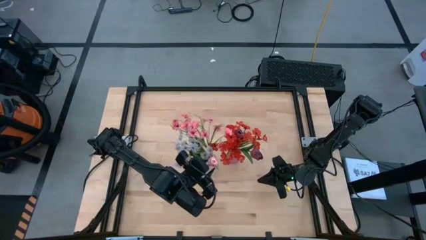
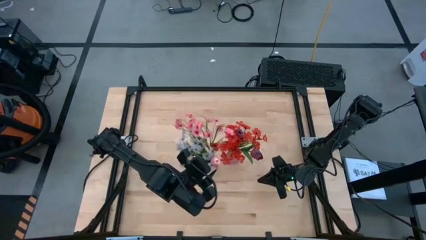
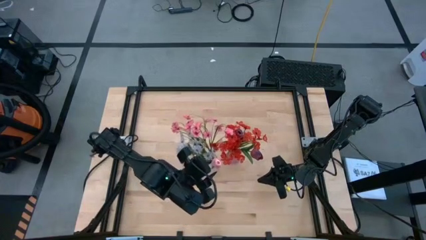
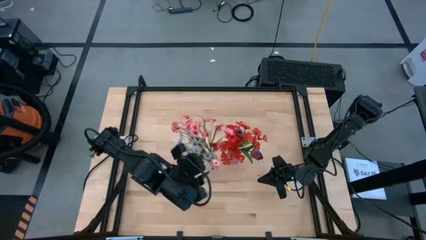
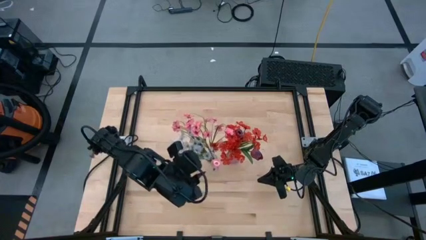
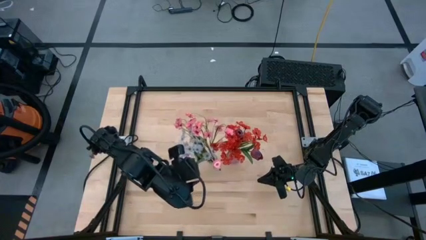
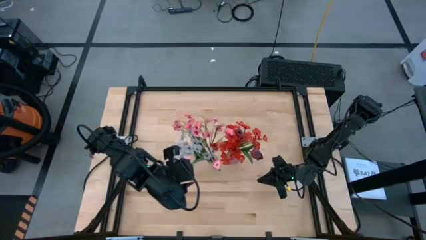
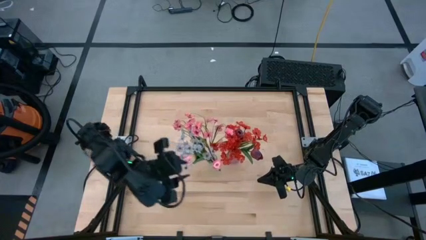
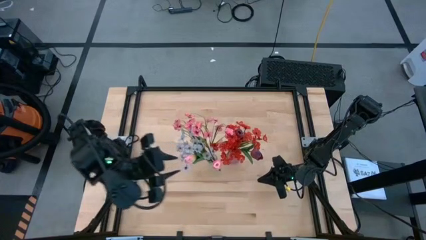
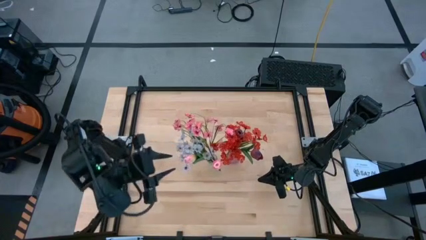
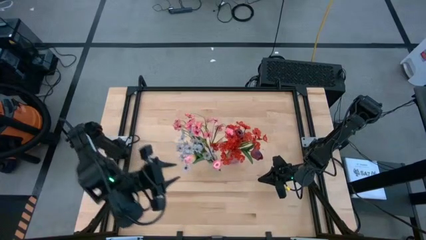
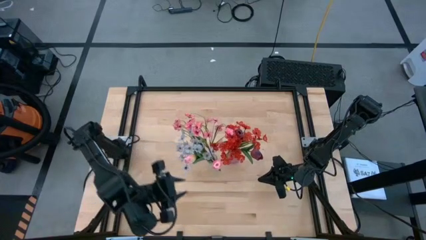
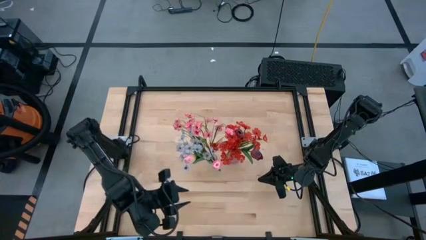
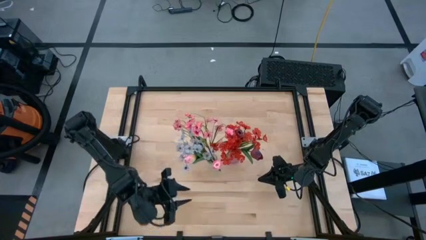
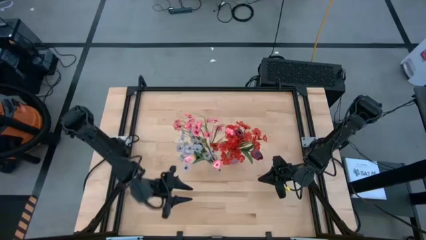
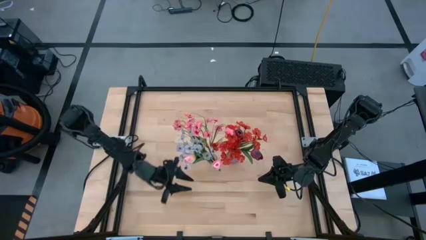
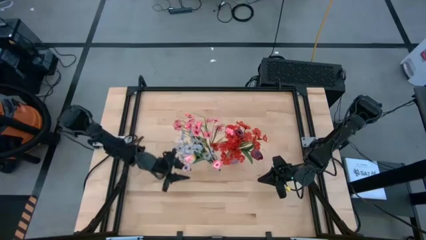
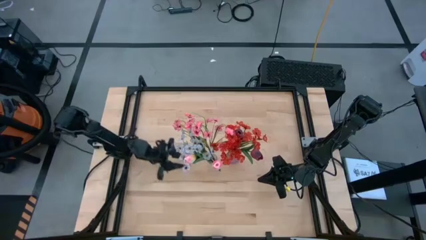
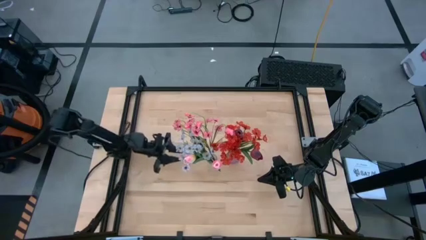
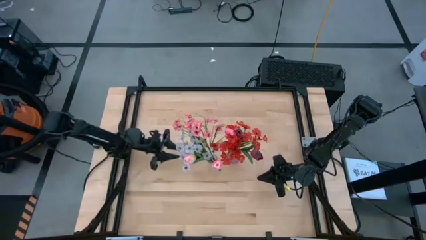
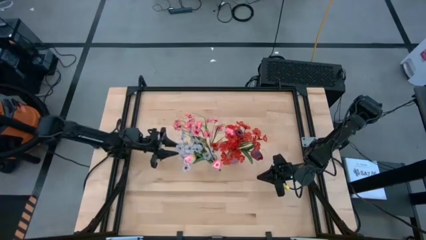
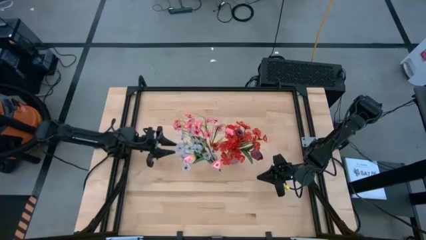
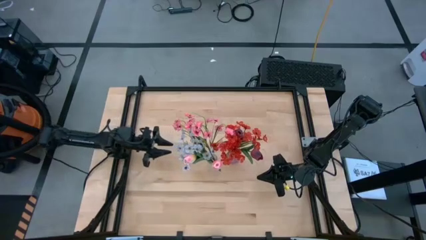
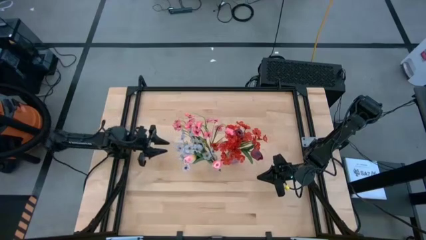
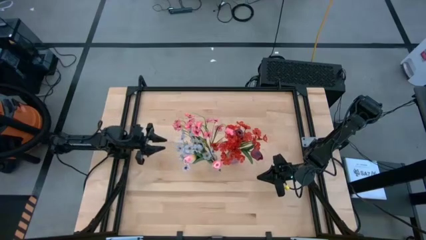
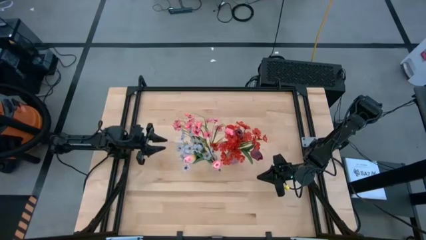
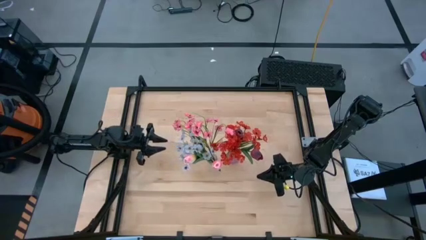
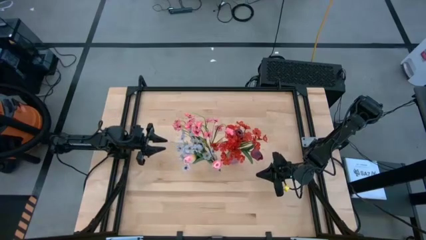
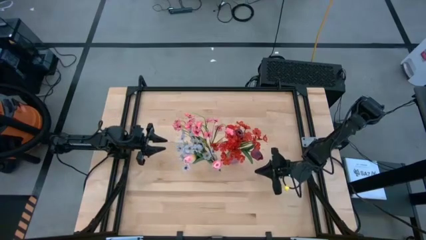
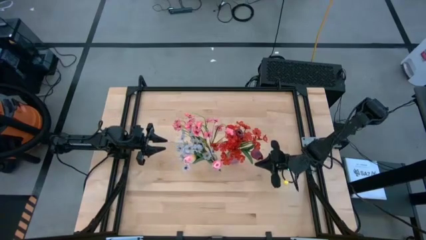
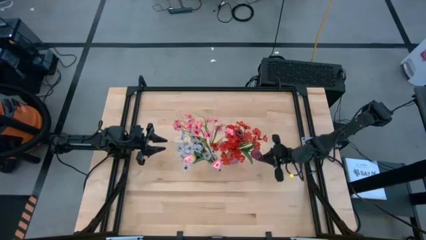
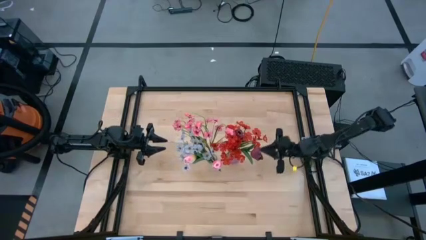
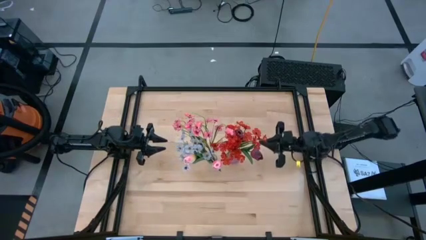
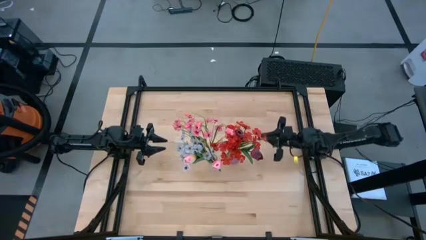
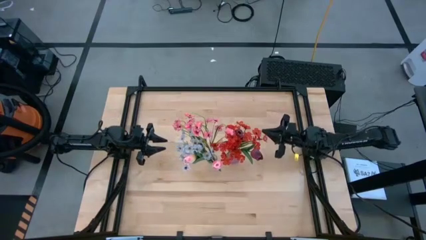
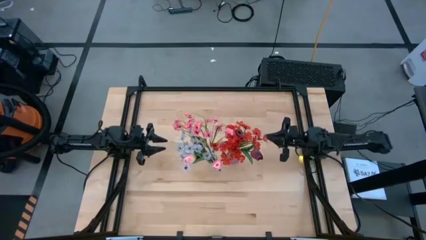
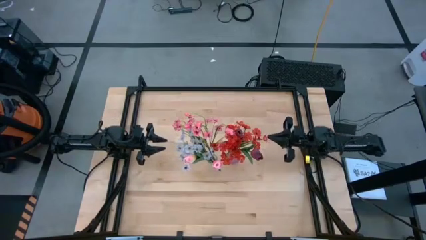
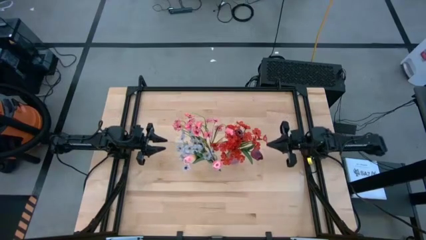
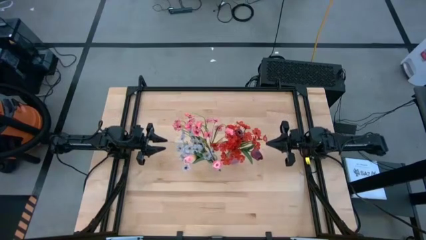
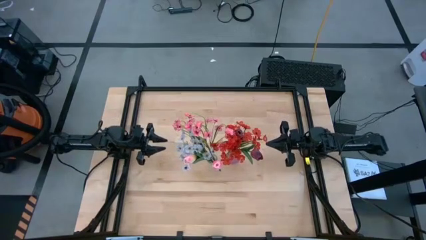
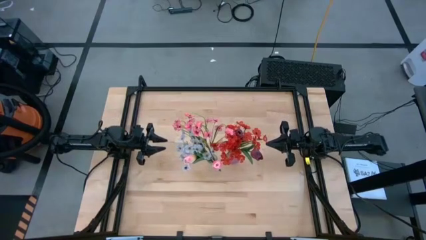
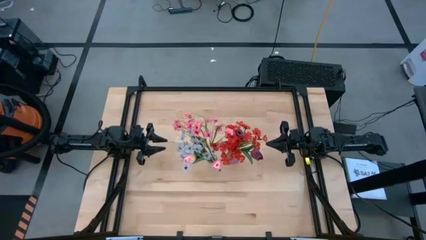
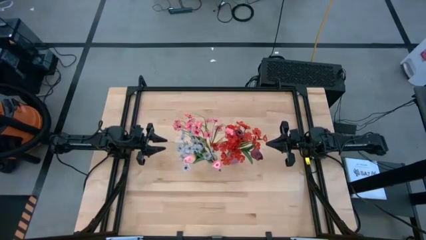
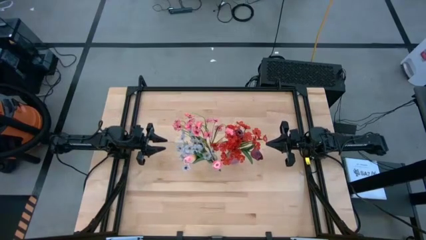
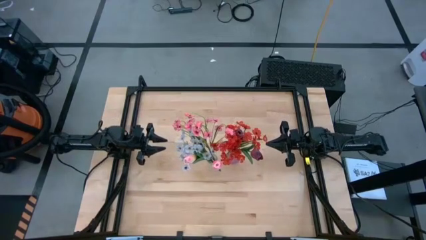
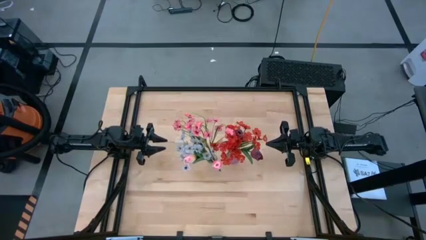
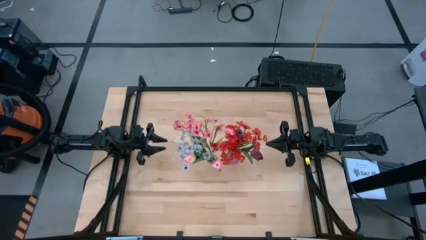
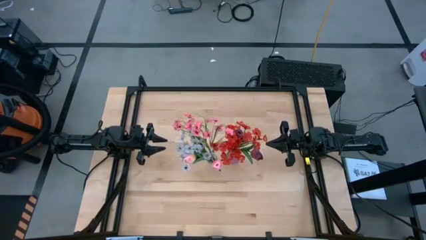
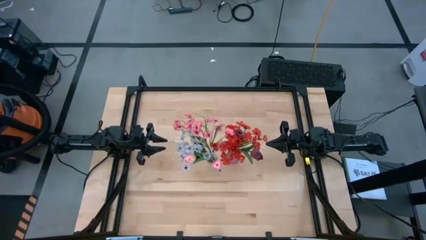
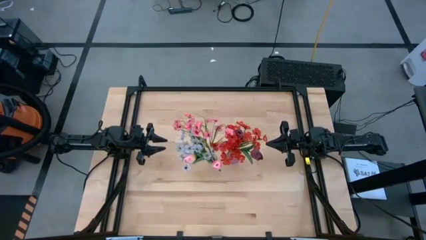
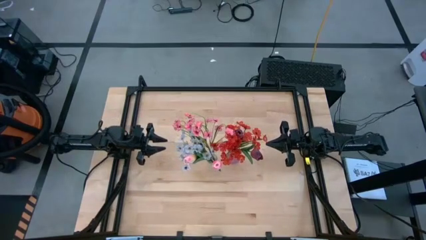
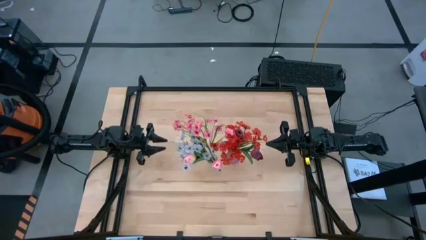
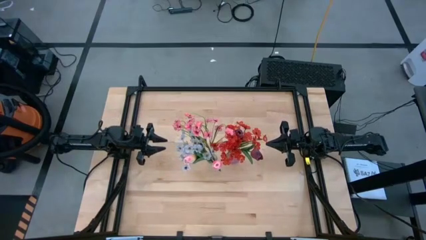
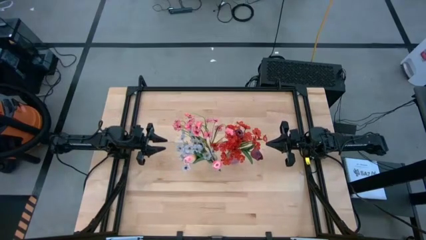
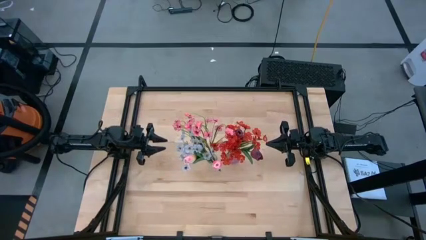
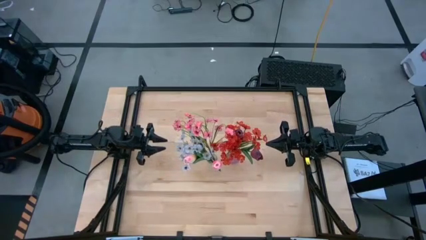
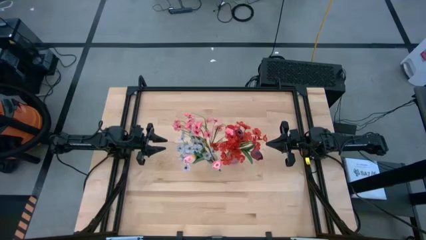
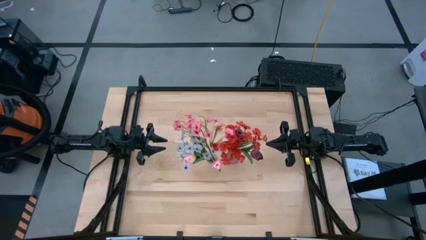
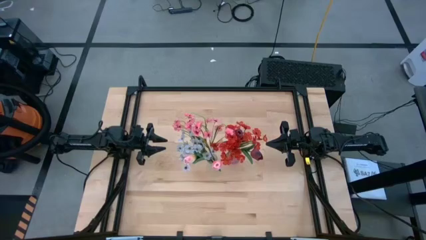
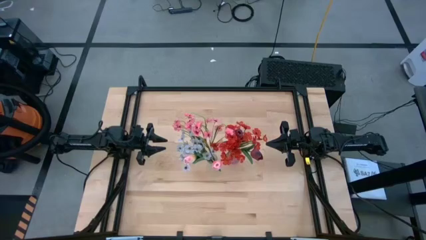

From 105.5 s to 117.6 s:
Task: Sort flowers into vase by color
Return to Home Position
